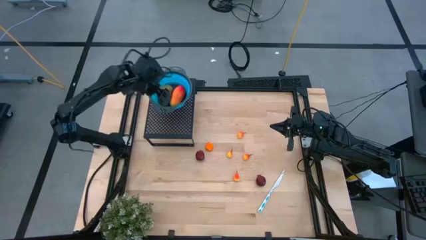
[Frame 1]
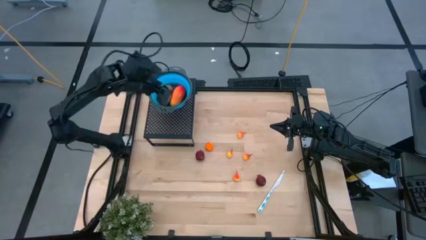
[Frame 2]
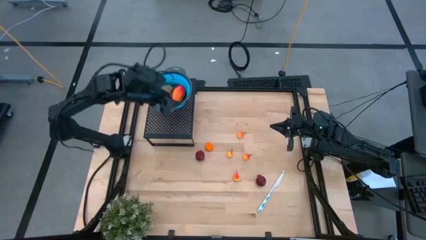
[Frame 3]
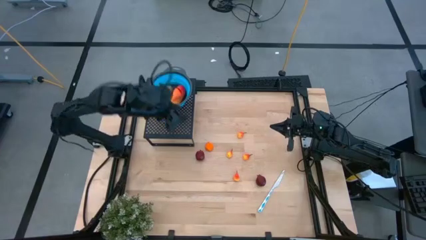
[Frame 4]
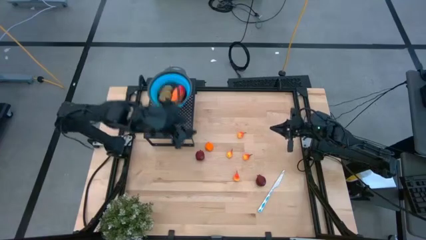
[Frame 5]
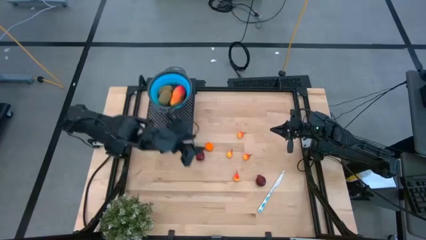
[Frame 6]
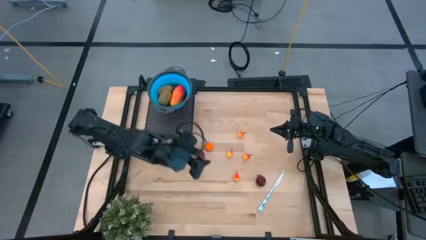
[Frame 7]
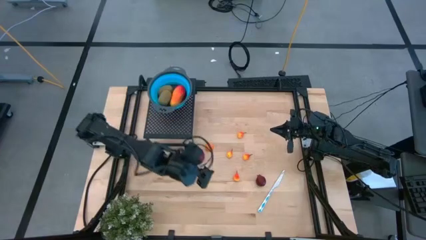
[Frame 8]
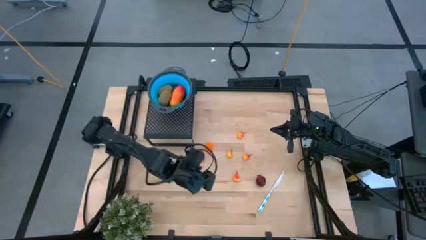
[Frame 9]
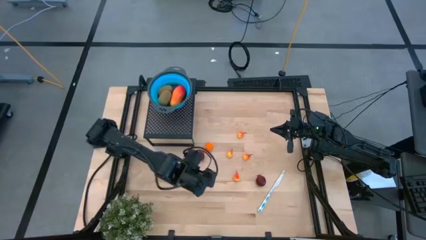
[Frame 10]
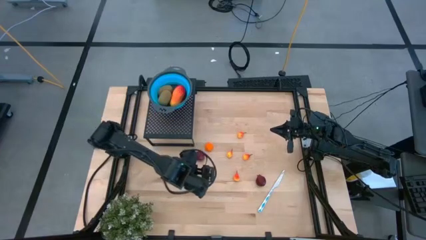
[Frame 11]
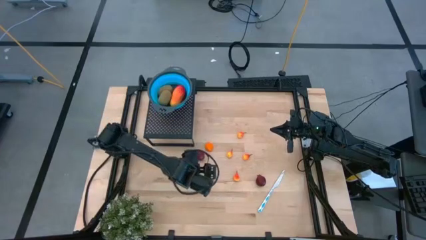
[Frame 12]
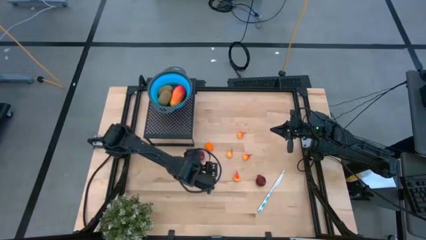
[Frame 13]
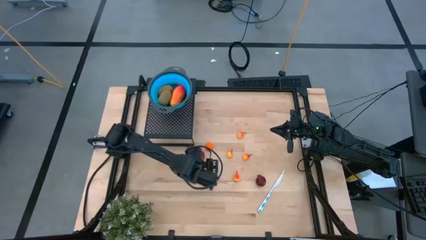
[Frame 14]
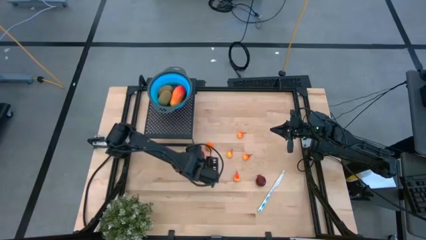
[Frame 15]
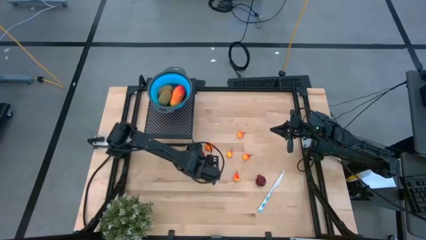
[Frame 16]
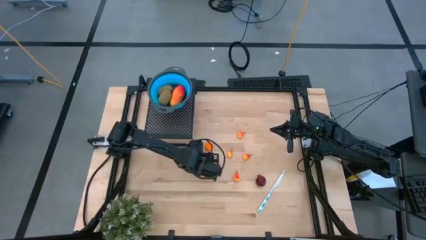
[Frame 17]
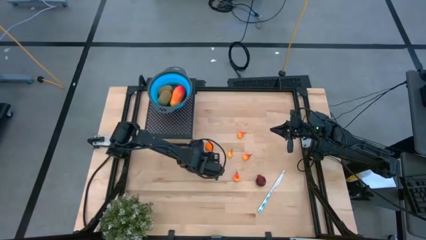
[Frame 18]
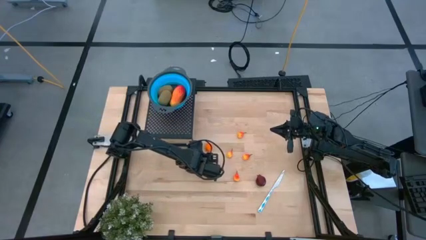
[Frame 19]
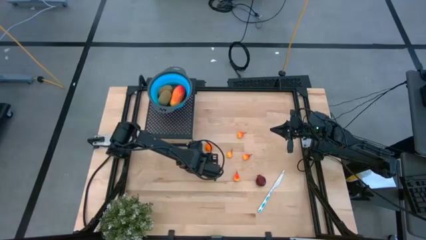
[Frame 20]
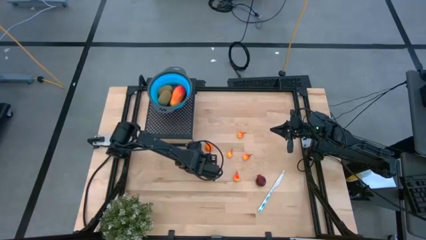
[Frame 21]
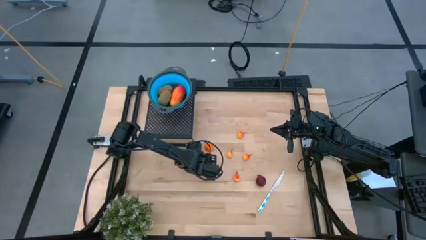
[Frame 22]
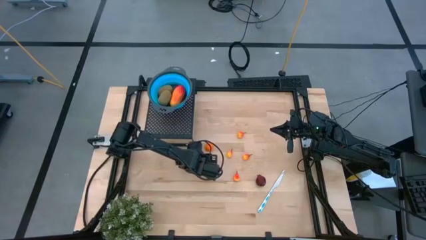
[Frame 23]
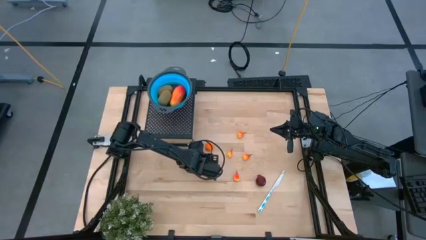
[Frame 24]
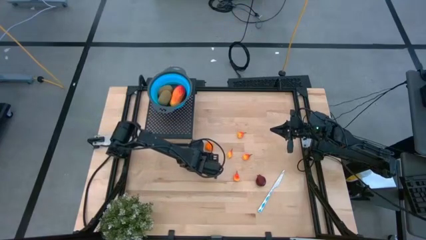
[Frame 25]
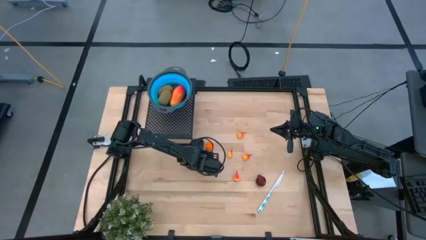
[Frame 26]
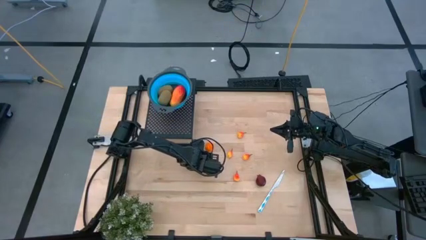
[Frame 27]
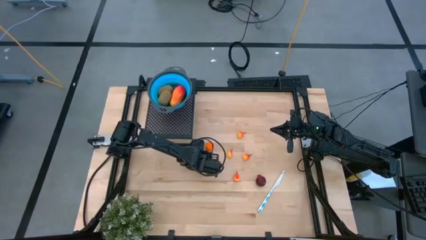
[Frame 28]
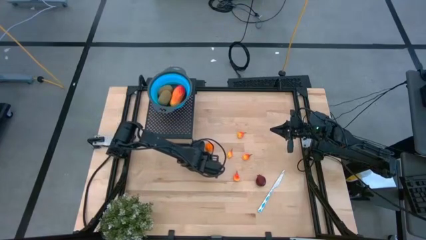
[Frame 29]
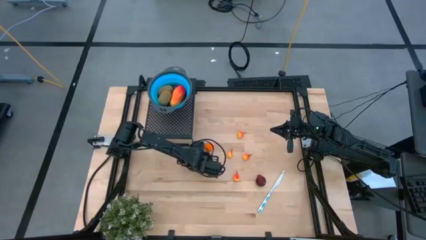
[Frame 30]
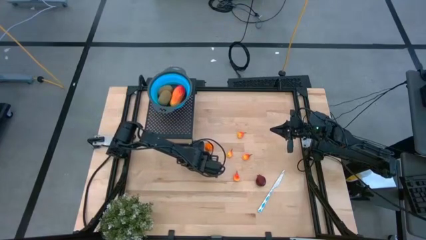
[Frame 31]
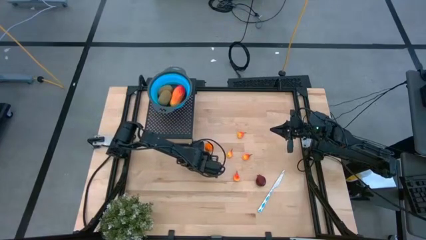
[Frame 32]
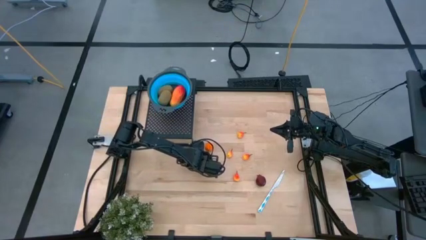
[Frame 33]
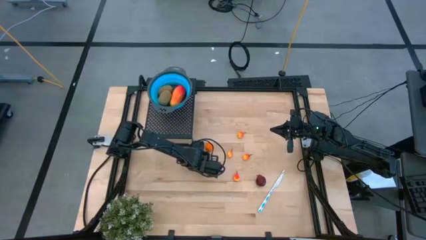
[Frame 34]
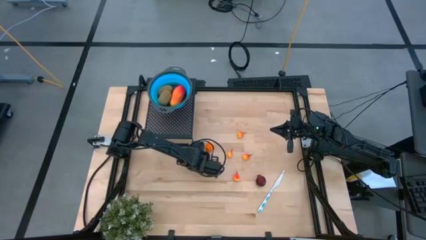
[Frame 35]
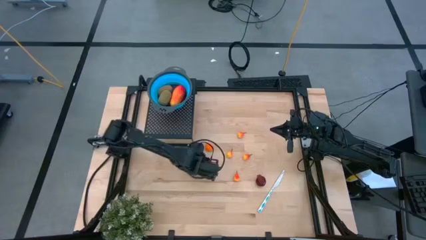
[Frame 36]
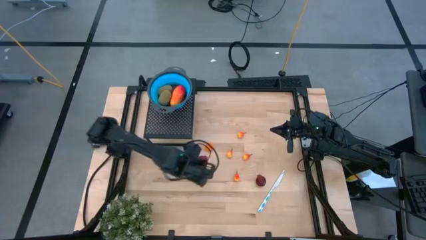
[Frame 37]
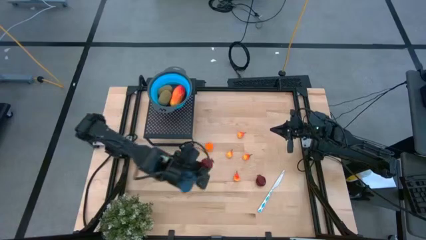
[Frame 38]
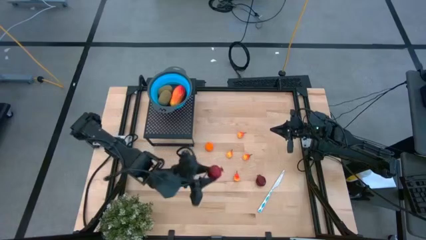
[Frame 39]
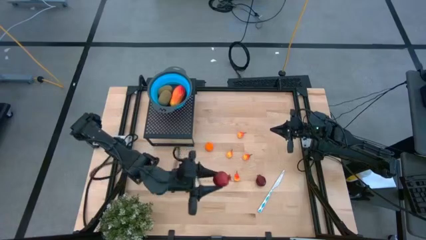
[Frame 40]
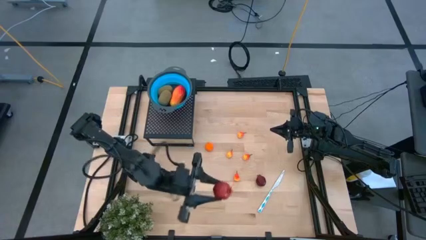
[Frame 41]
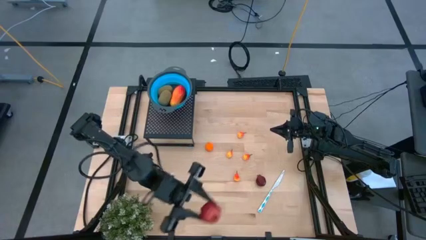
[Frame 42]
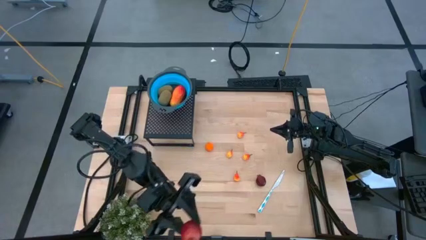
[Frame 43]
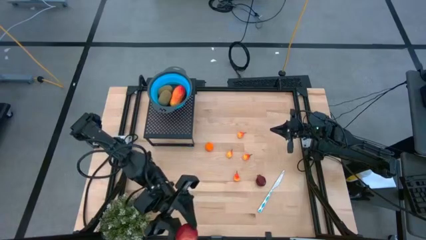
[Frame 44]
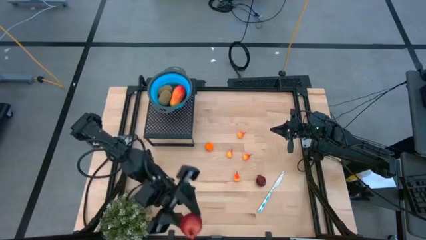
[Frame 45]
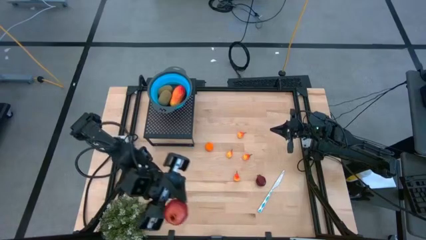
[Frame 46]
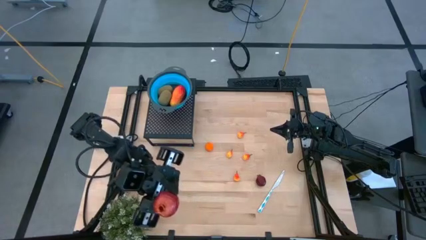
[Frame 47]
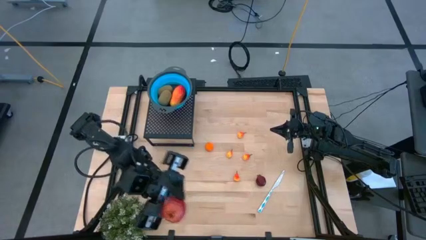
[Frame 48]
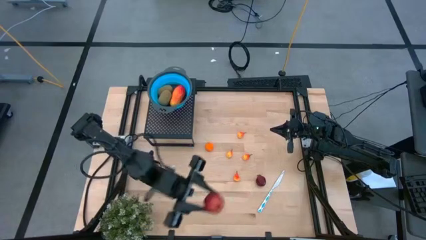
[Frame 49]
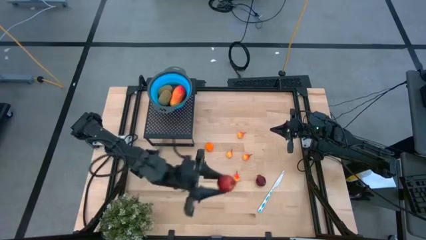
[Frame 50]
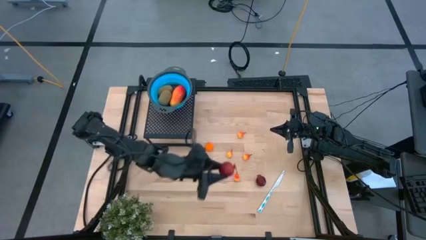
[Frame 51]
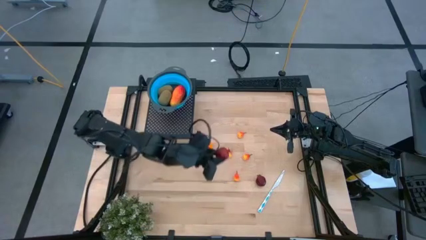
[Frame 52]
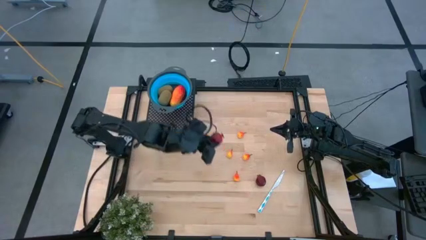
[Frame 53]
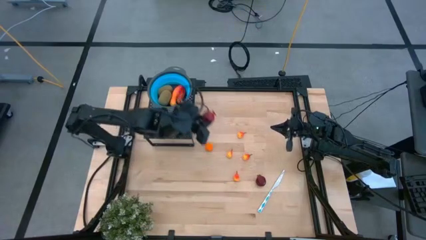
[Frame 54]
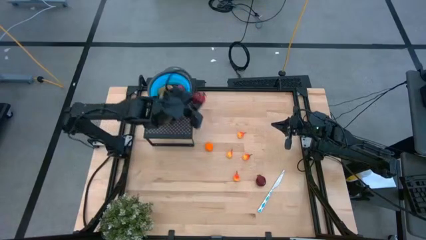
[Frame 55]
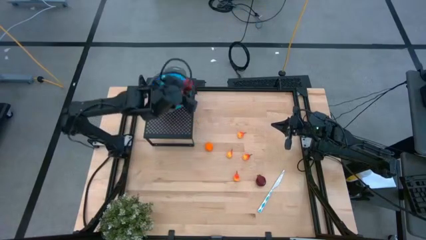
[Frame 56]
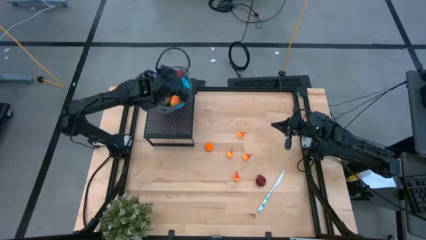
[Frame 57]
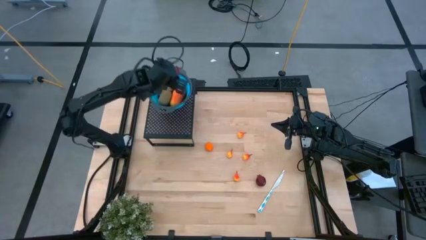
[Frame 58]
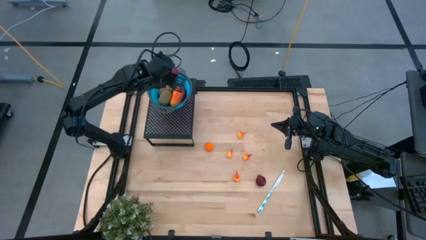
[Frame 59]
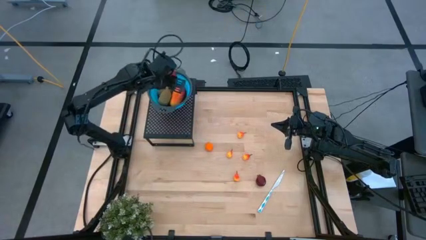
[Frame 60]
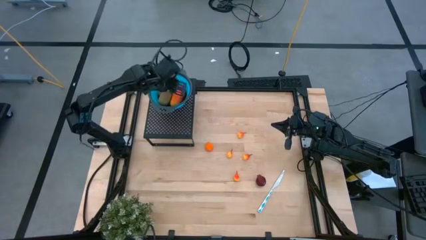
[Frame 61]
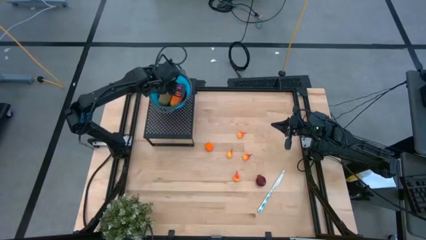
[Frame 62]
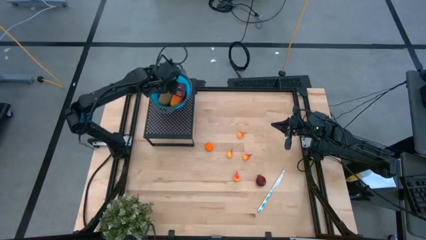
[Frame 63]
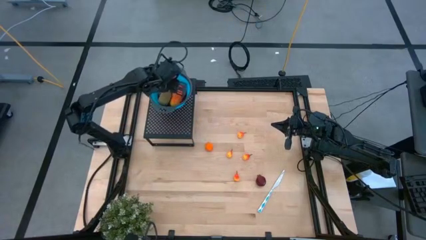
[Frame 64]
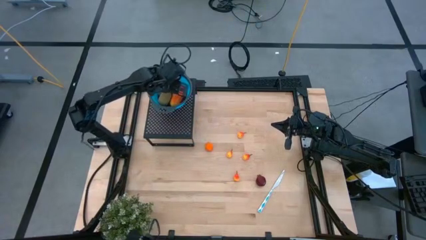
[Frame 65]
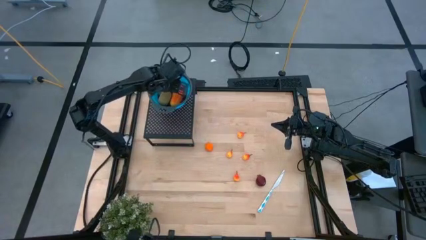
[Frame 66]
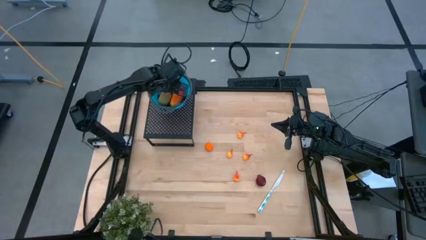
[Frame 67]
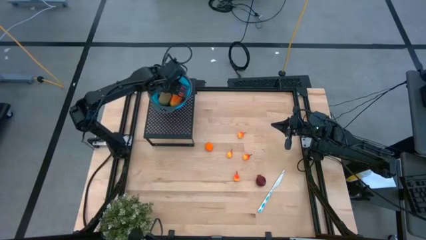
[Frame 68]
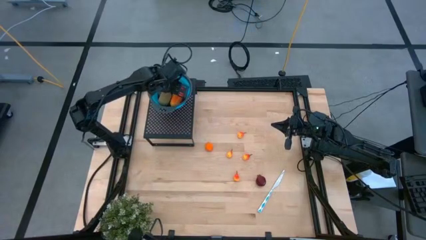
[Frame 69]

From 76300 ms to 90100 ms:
Task: Pick & Place Fruit
Put the left pomegranate into the blue strainer bowl on the shelf

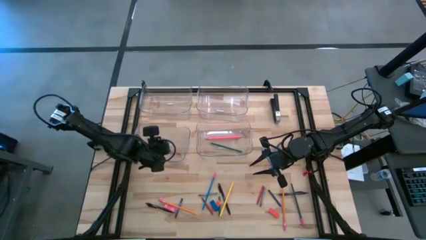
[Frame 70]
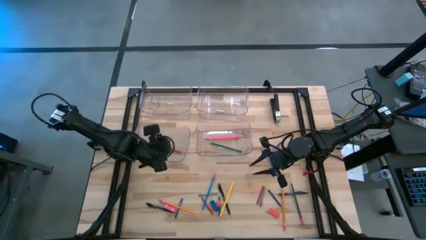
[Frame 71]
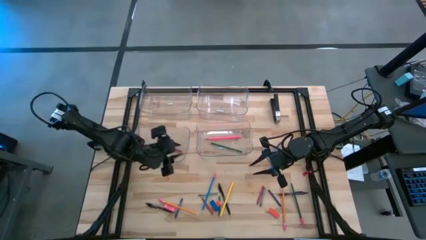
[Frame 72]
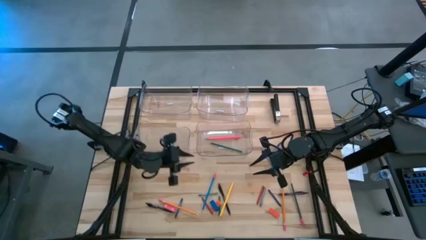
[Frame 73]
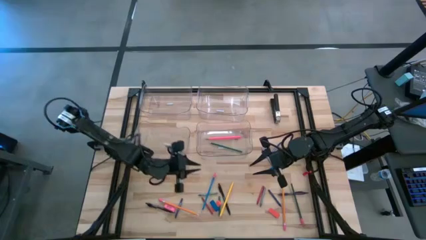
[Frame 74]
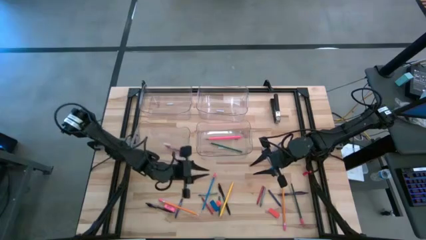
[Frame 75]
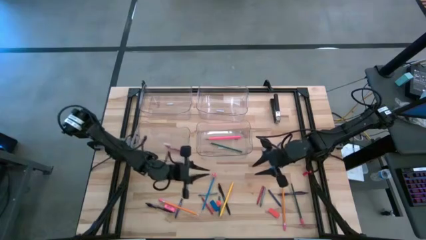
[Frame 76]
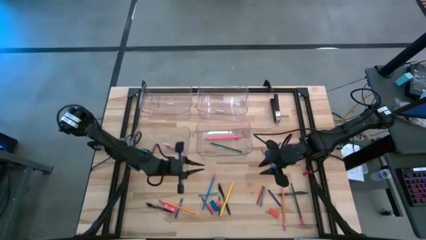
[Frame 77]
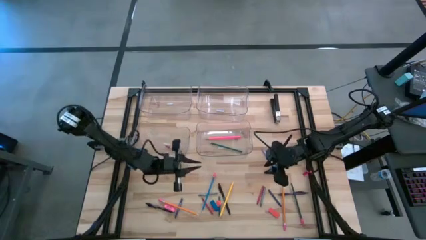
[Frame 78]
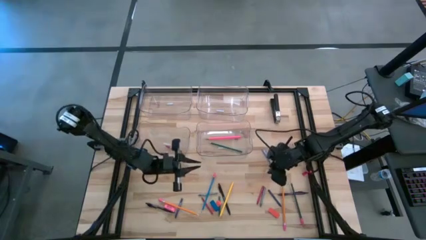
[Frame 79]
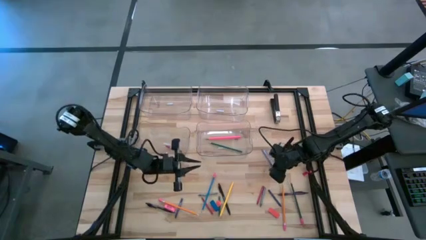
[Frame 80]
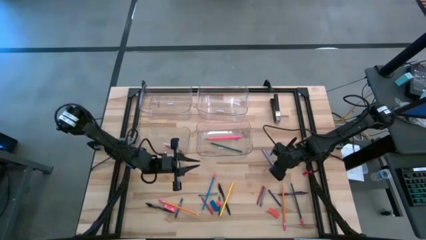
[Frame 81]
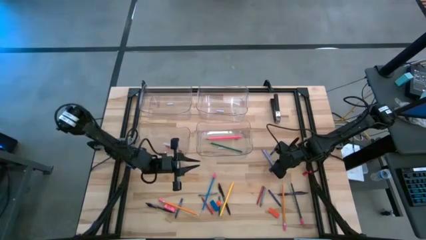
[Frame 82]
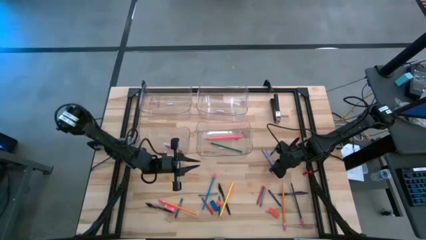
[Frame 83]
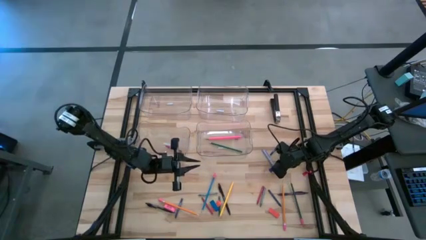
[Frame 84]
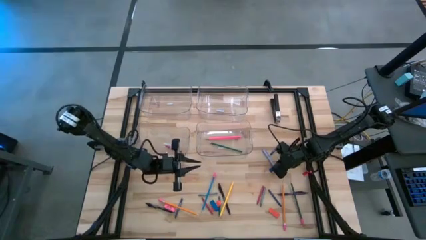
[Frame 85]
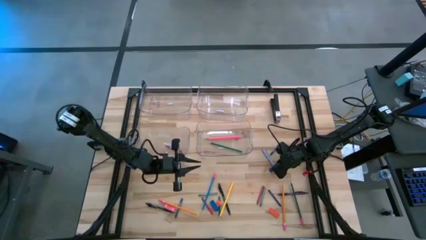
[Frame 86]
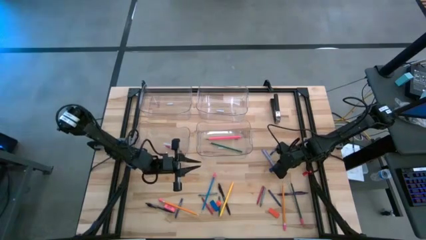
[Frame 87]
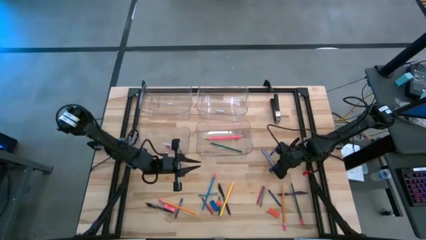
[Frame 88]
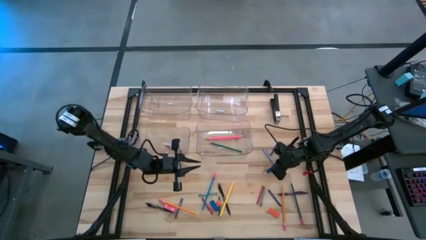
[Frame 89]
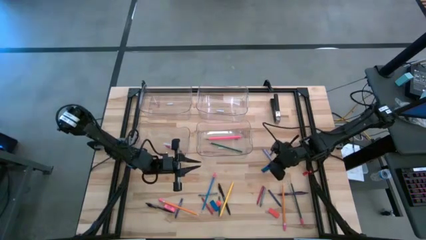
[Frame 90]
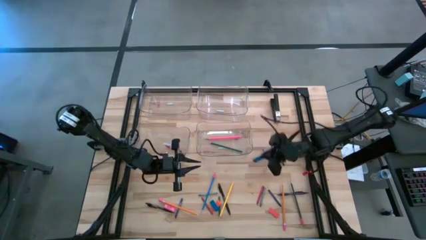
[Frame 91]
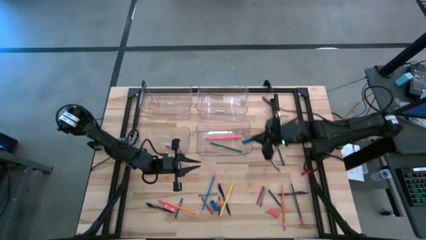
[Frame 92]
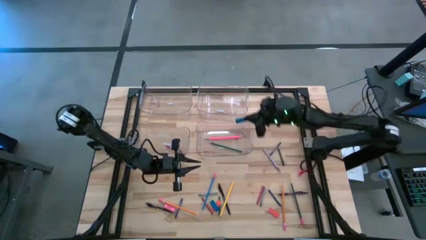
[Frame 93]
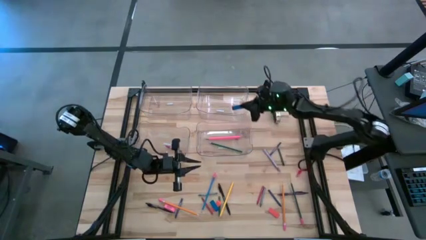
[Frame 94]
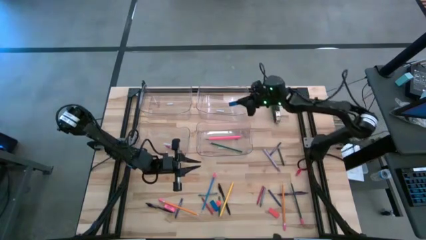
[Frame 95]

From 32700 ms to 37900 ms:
Task: Sort crayons/erasers/pens/pencils in bins
Put the top blue eraser into the top right transparent bin
